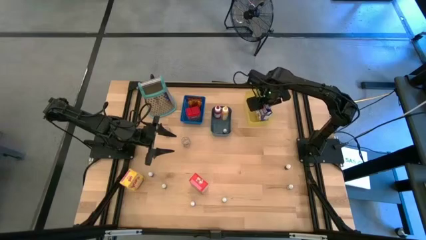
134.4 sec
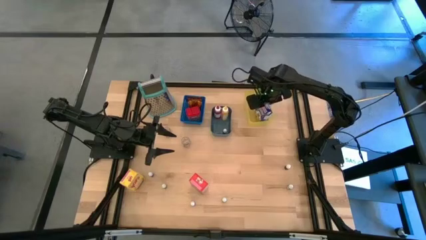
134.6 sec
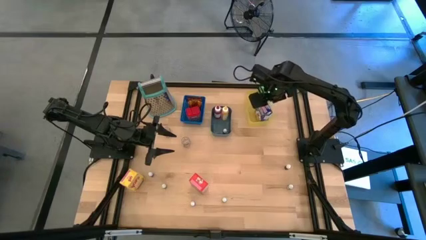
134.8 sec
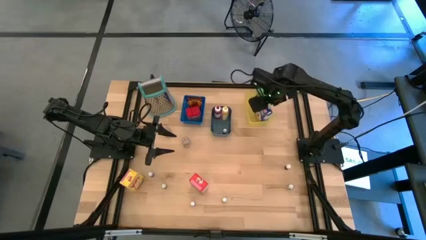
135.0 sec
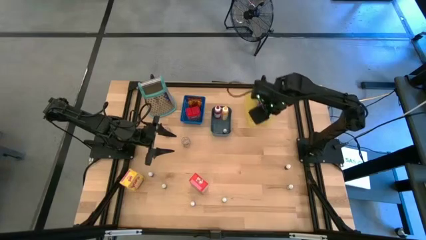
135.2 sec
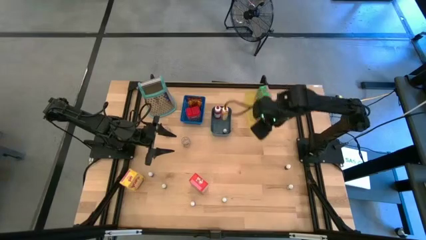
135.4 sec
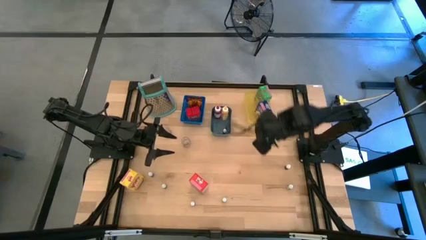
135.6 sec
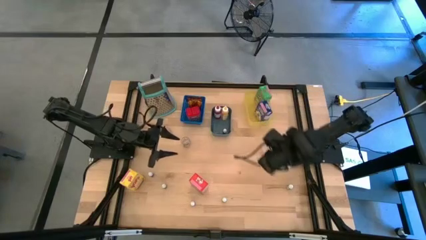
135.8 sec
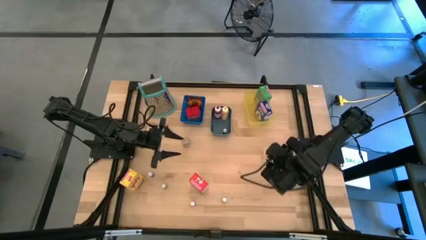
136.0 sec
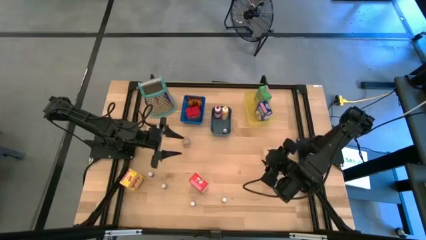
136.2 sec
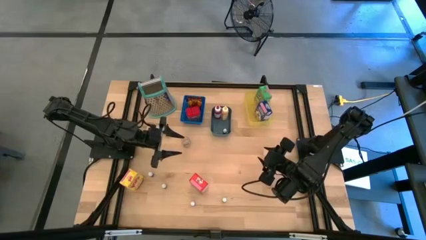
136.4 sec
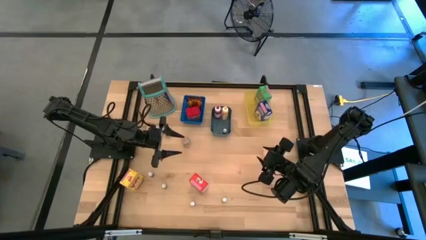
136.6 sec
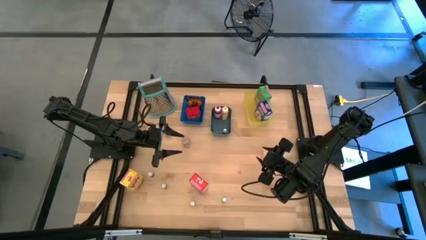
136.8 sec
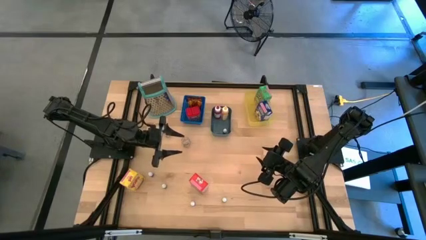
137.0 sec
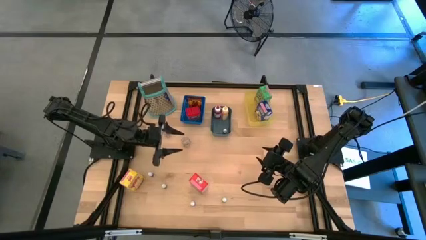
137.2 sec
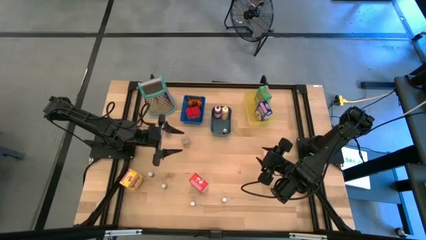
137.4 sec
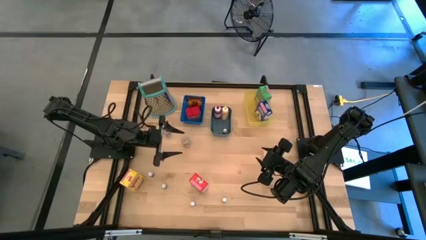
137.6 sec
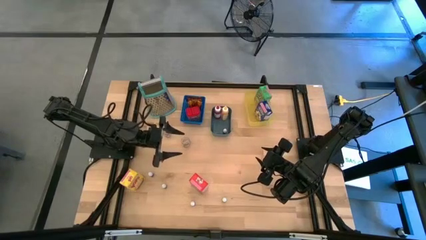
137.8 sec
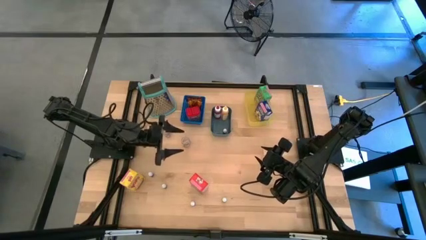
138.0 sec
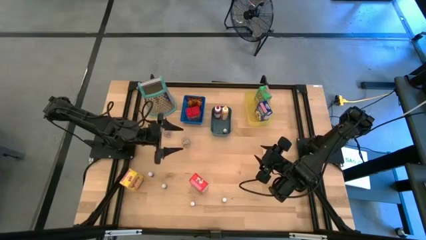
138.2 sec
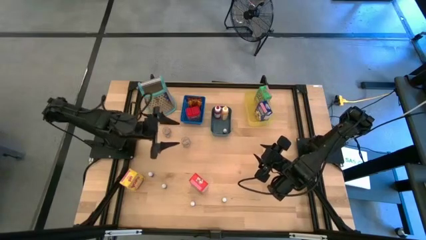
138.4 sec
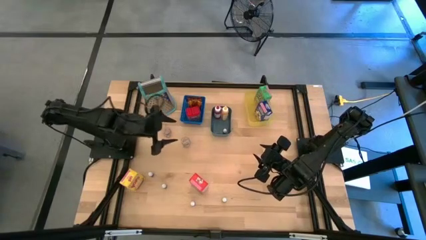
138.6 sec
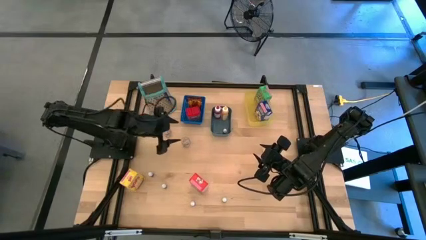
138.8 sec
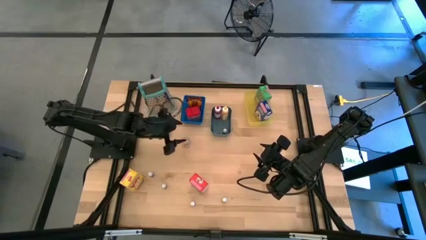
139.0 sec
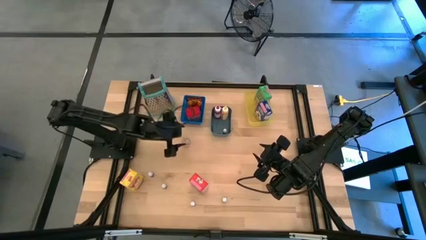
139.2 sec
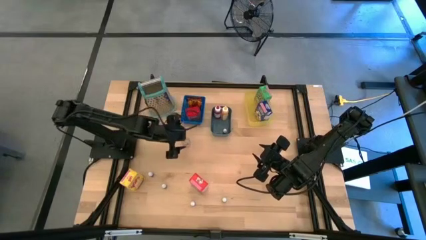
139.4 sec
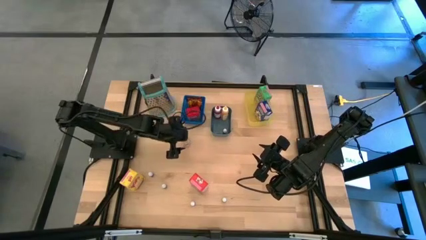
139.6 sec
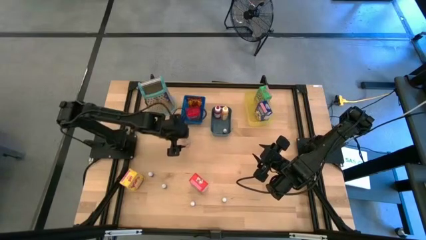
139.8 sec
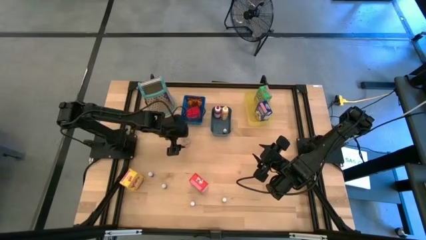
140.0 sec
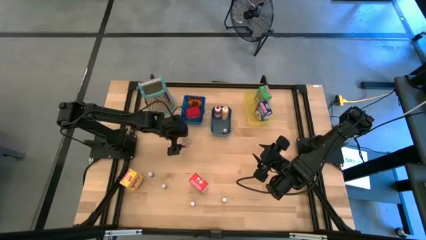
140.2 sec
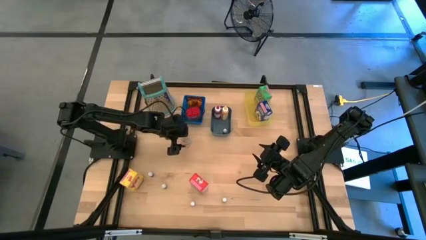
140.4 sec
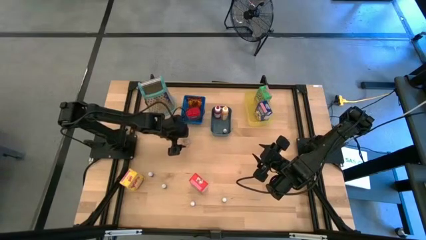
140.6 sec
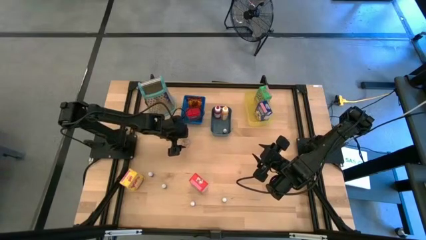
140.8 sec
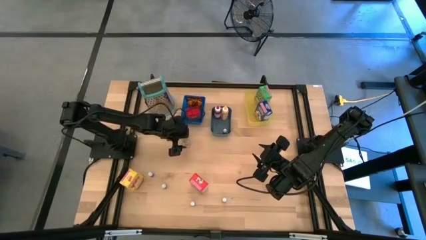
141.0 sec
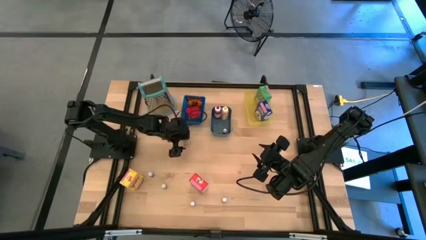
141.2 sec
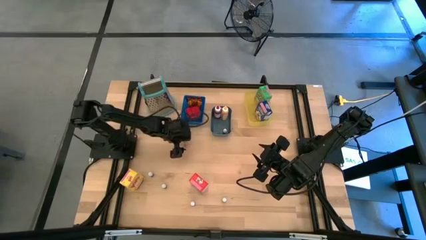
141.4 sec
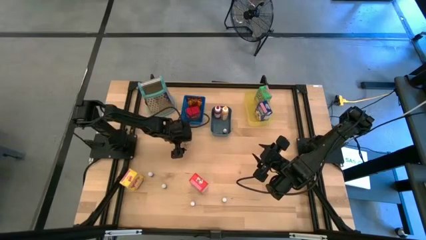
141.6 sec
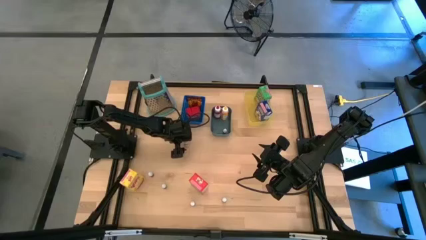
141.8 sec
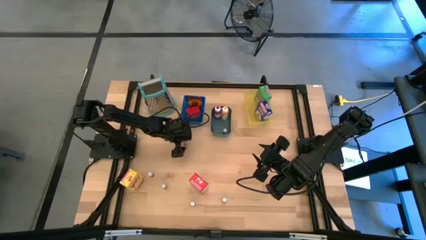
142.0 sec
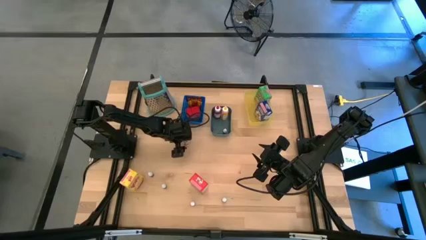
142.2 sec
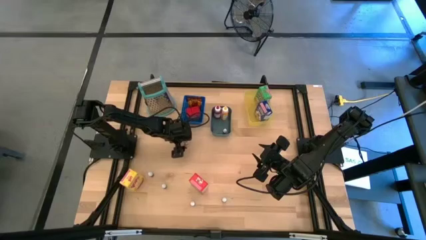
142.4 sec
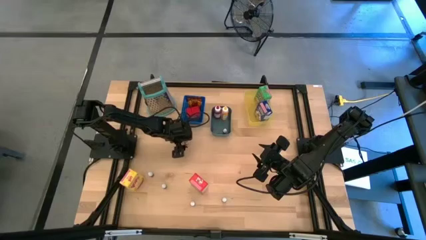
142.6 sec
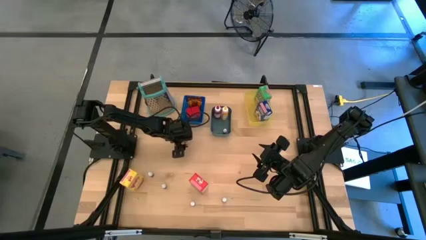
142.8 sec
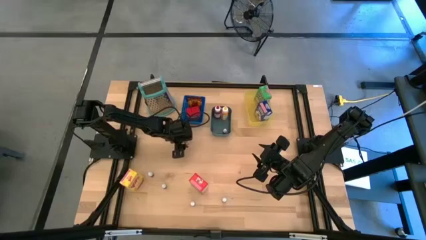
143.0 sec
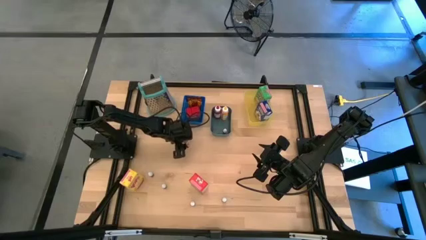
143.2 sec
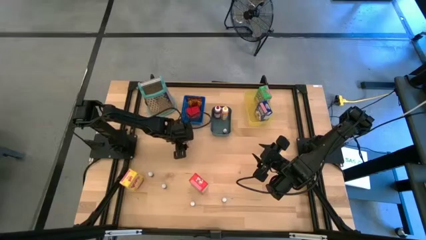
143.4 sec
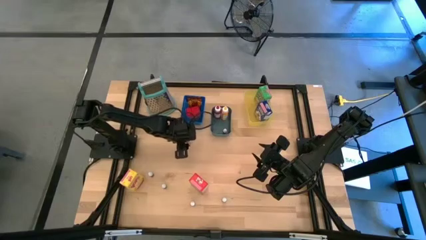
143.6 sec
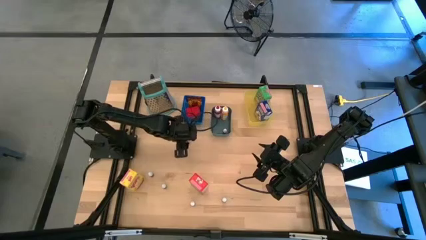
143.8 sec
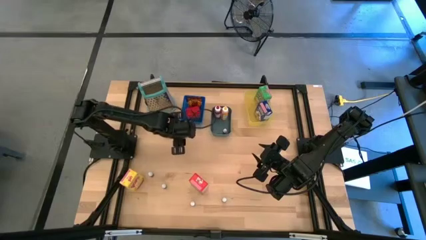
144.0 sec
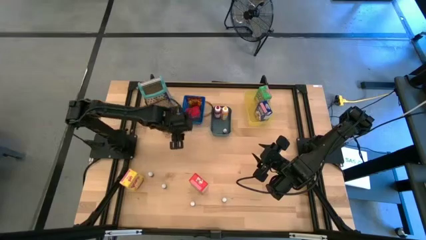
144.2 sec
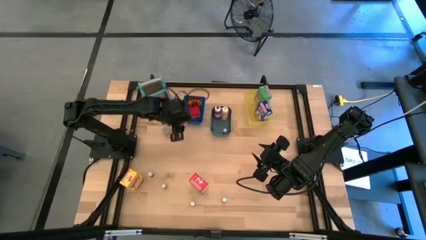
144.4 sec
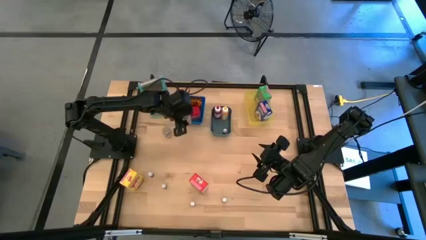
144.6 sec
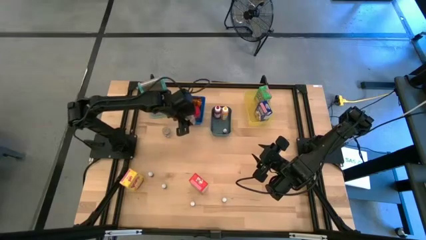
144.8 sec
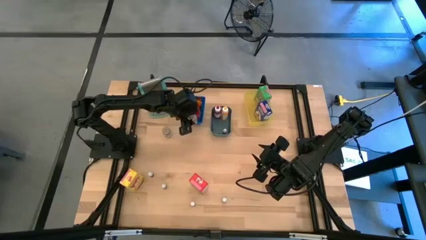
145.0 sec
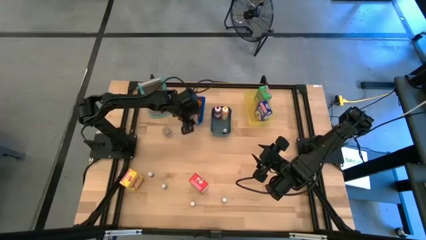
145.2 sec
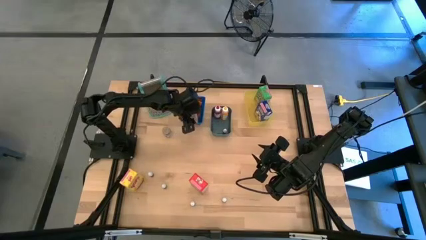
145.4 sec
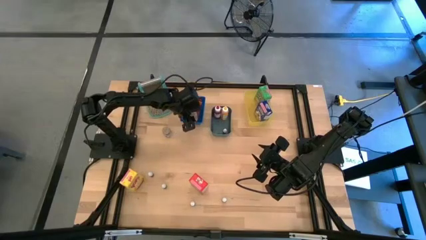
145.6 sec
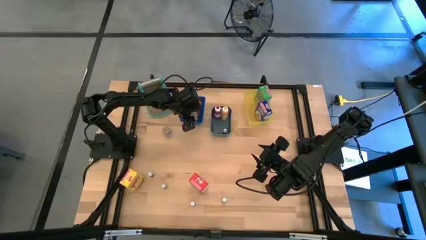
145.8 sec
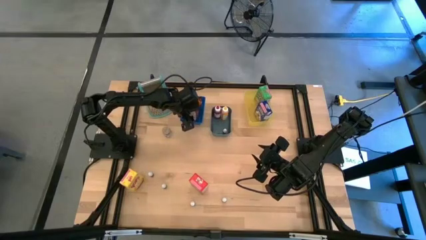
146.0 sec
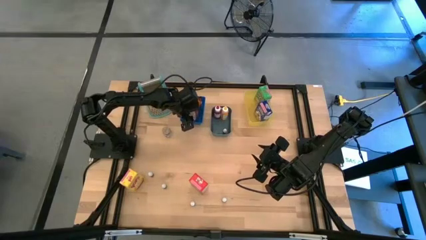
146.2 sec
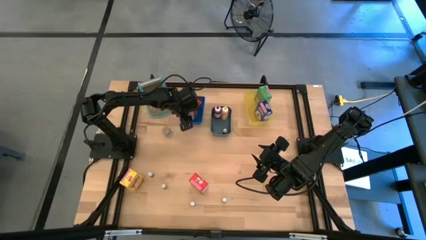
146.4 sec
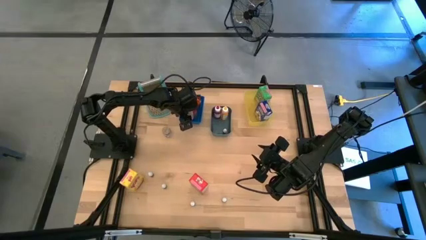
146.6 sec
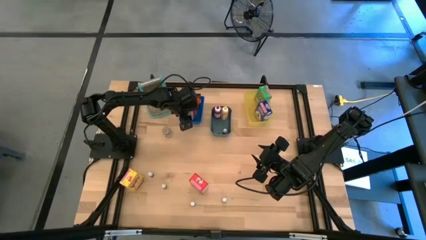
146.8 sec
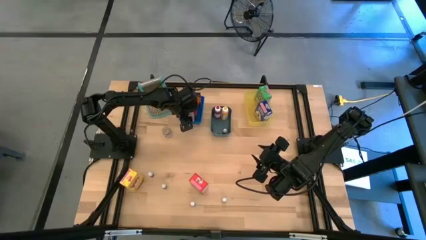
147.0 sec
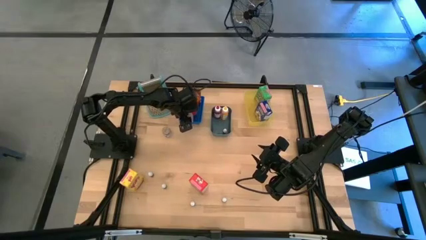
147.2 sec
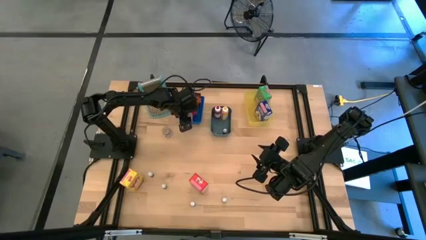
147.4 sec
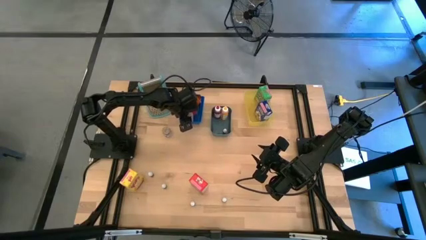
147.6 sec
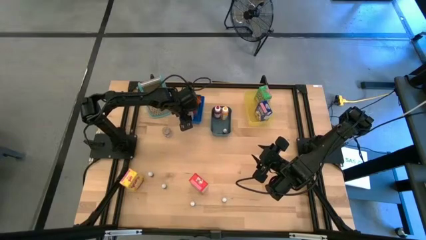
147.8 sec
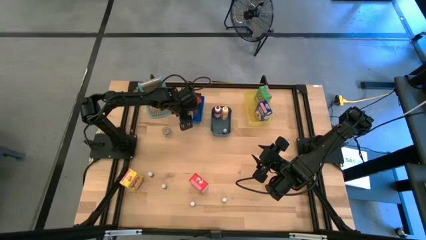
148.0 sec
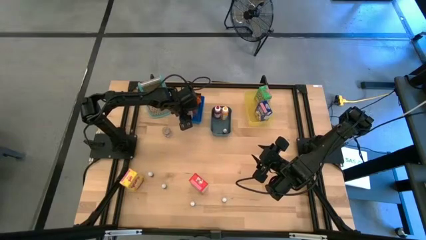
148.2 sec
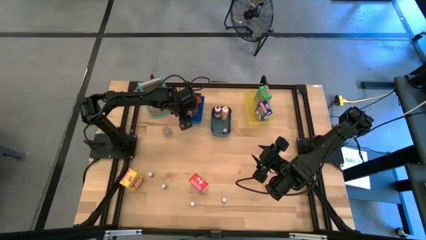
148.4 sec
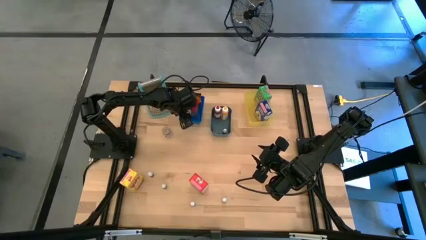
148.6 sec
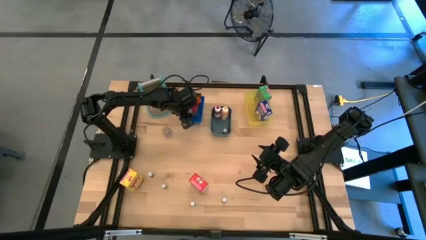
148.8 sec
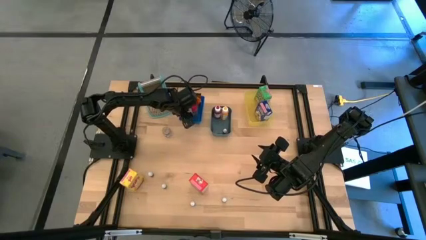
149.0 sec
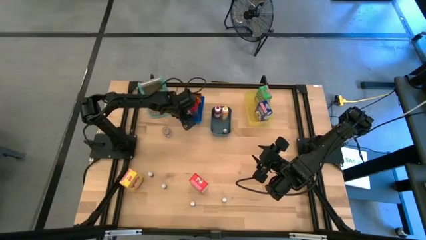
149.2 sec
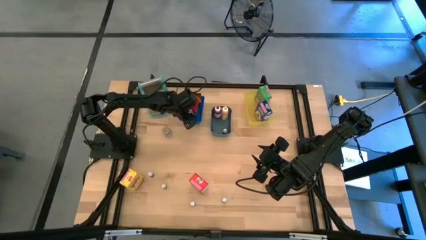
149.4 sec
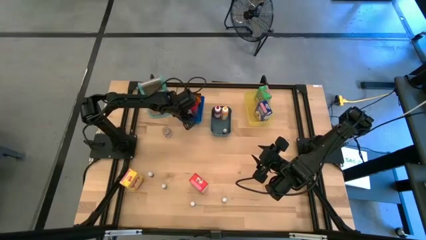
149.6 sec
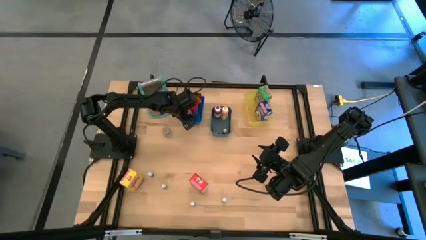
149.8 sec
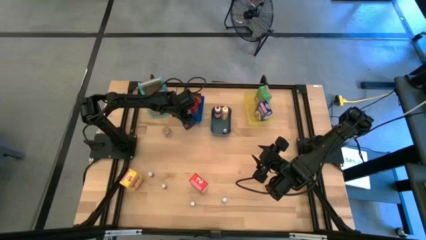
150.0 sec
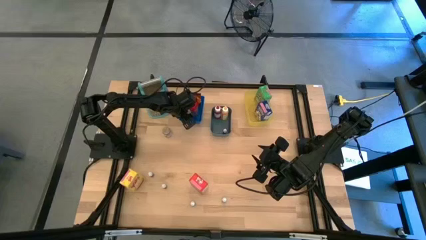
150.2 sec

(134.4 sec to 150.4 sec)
Task: Pick & Place Kitchen Items
Put the brown seasoning bottle into the blue bin

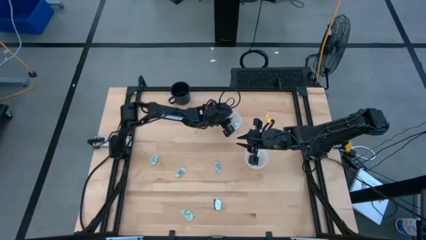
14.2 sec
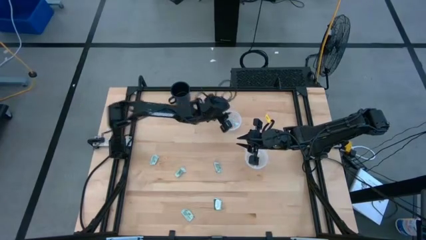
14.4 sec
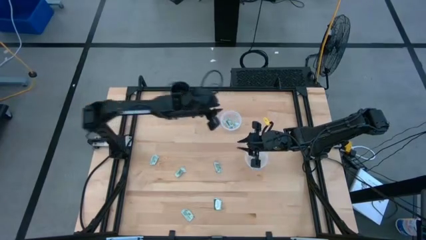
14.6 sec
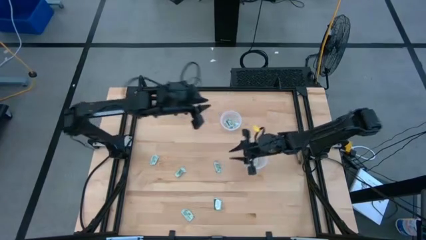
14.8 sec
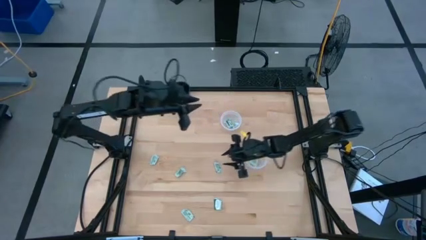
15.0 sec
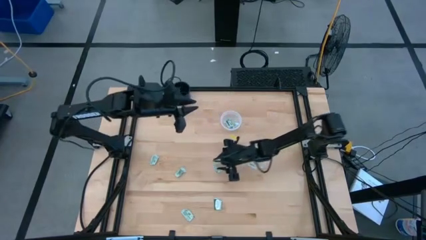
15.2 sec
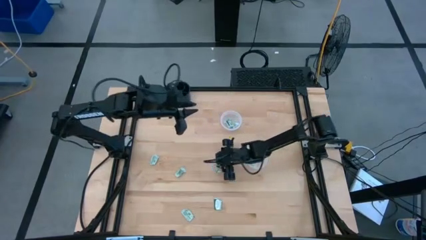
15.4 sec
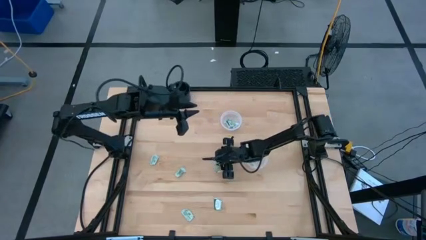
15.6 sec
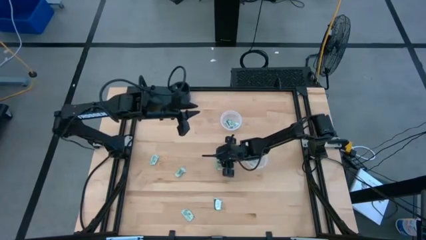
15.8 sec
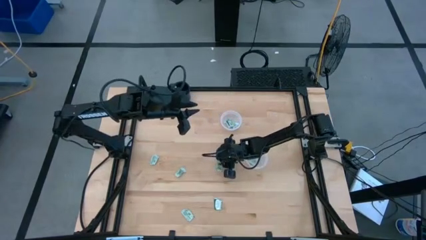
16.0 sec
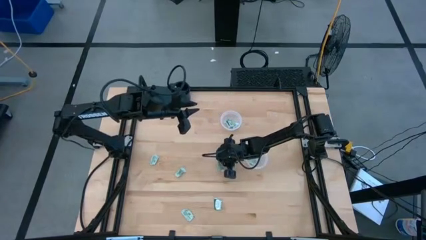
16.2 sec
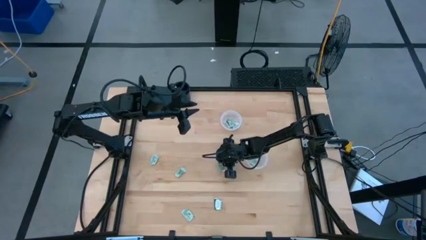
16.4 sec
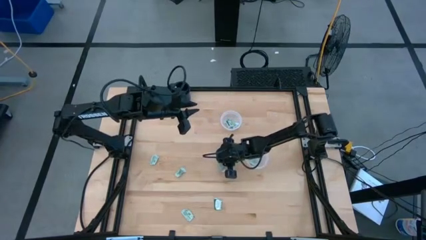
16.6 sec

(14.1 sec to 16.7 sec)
Task: Pick and place items into bin
Put the stevia packet into the bottom transparent bin
